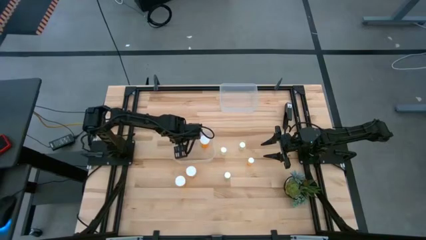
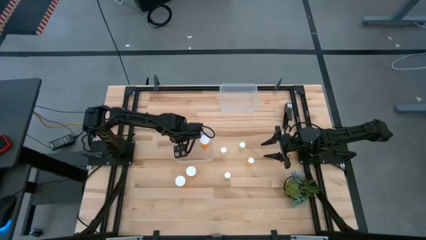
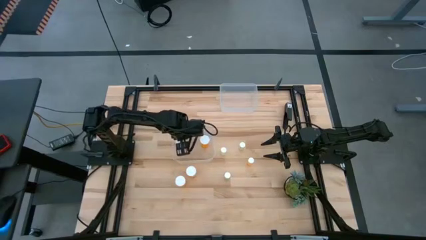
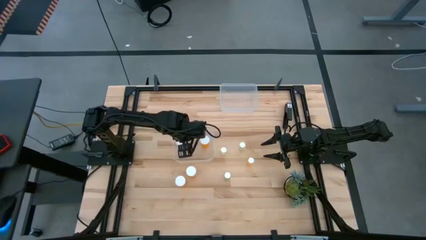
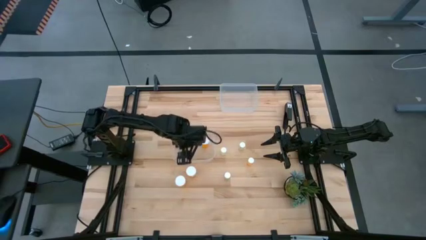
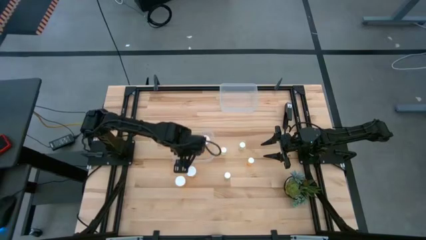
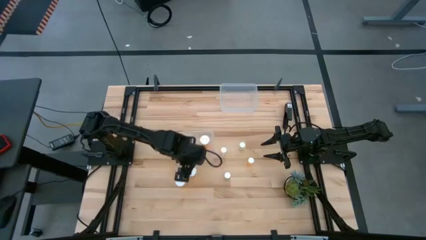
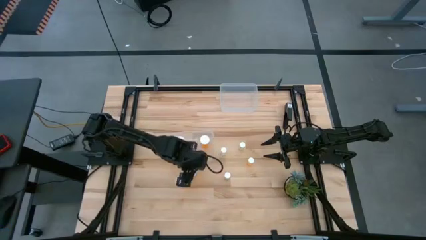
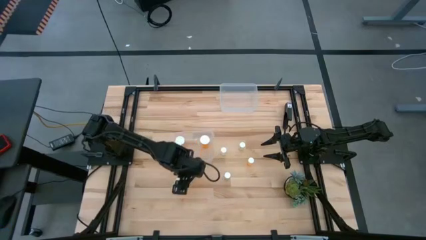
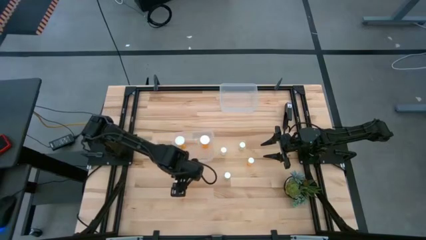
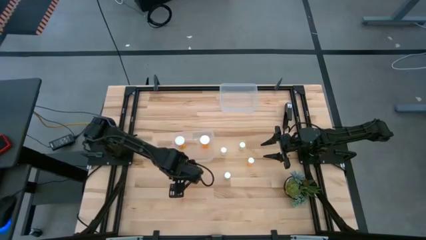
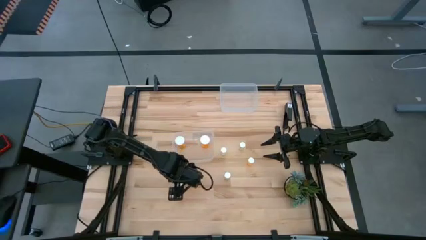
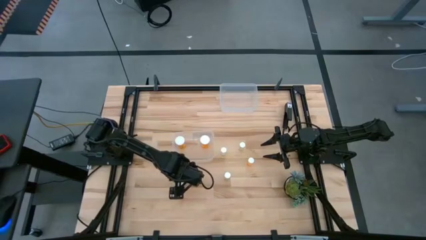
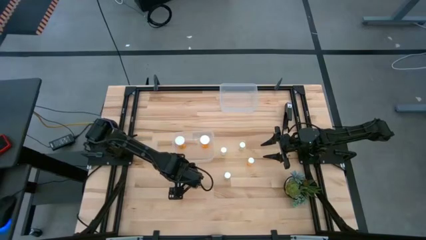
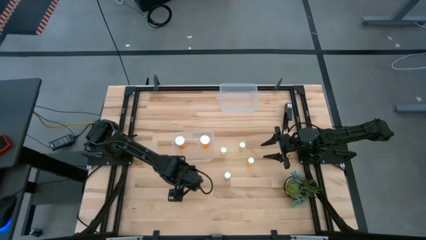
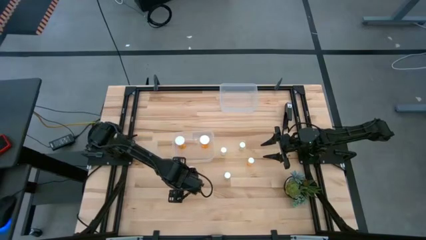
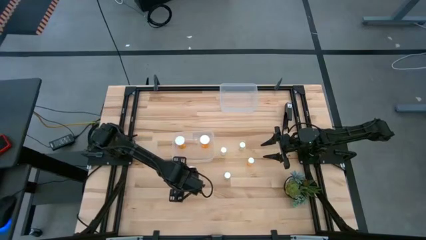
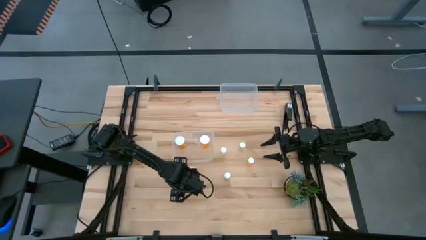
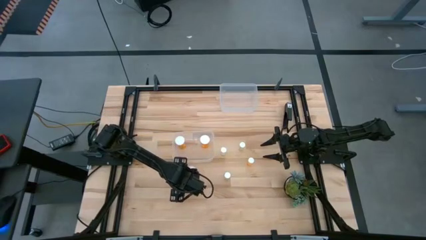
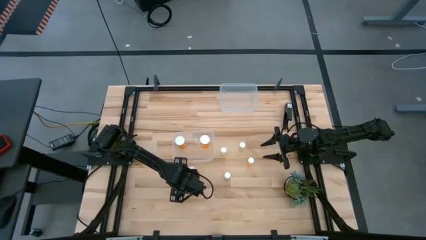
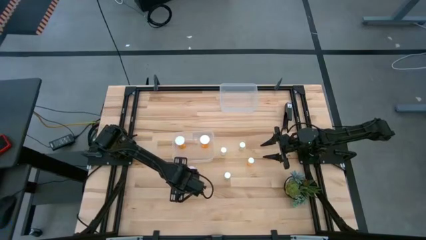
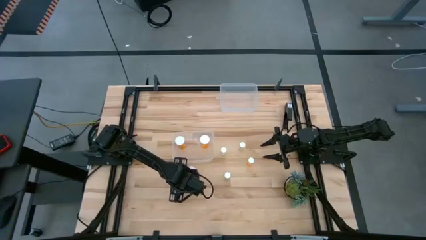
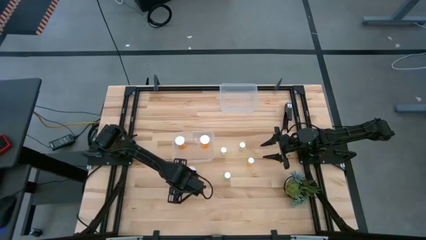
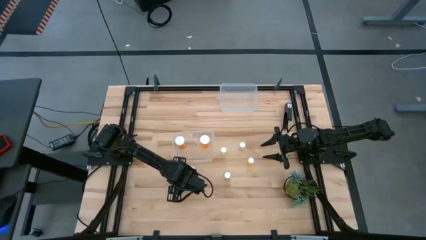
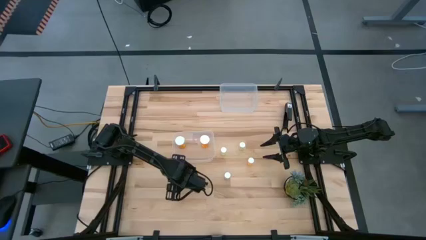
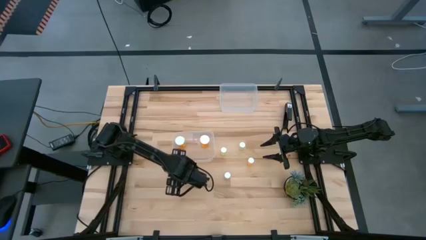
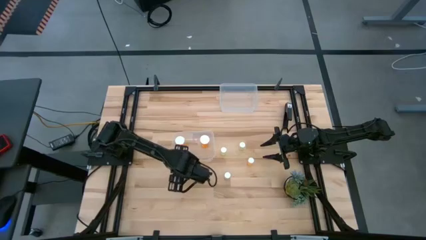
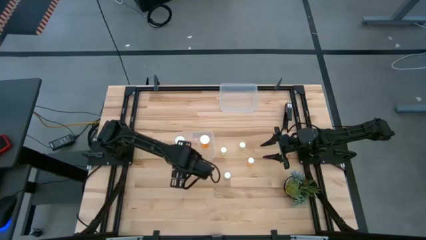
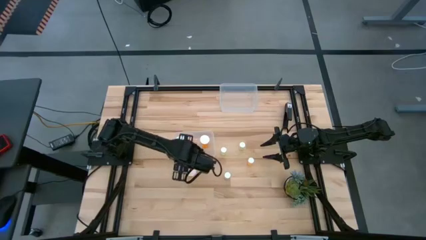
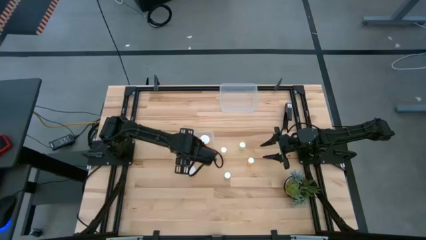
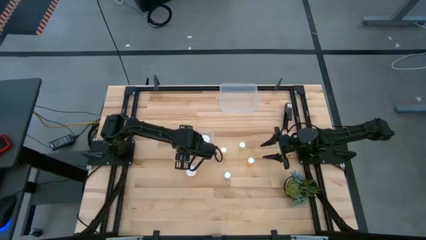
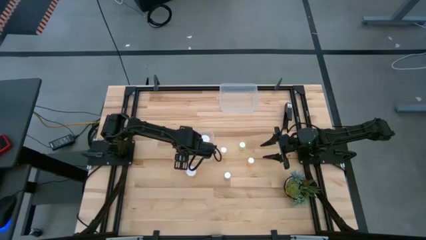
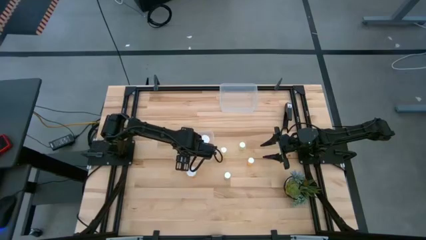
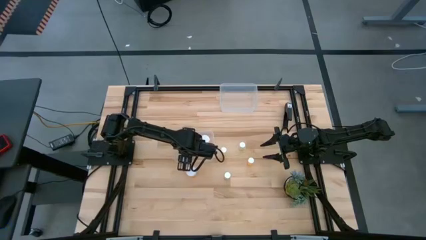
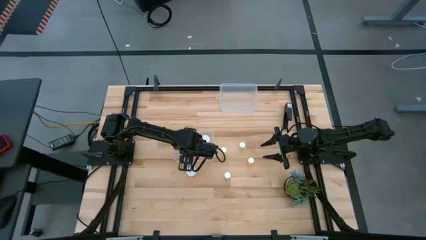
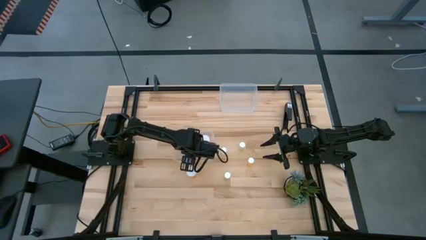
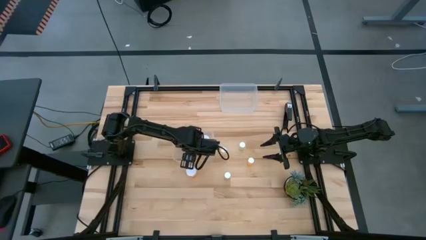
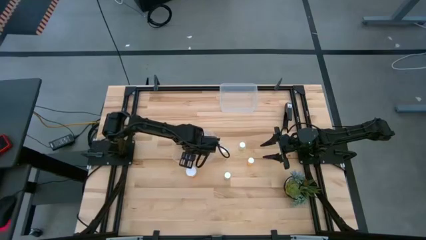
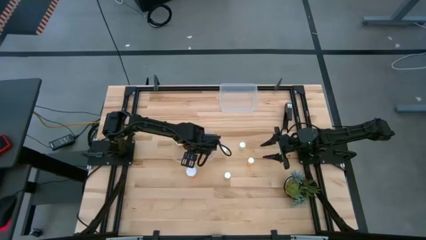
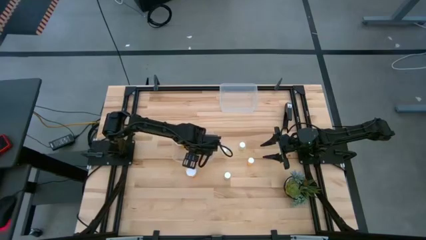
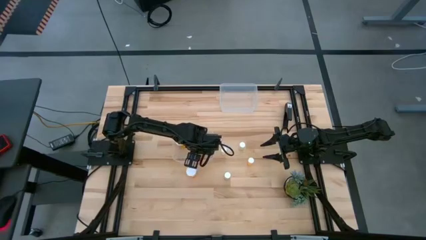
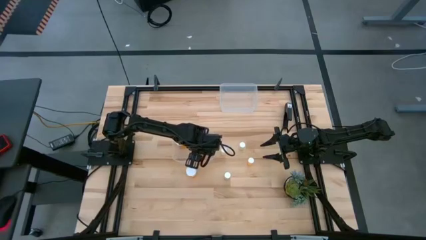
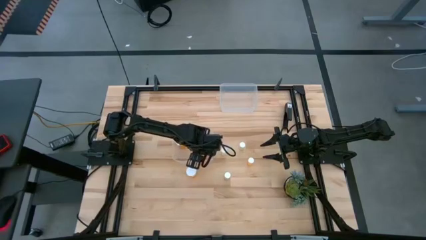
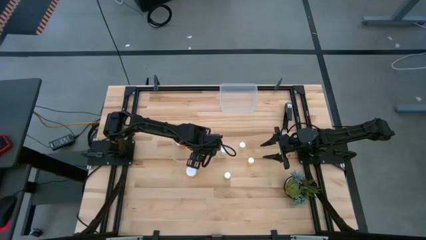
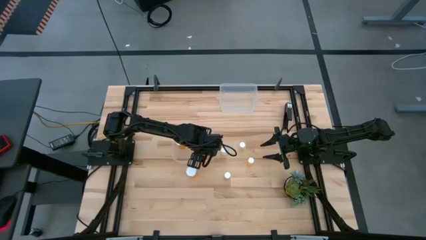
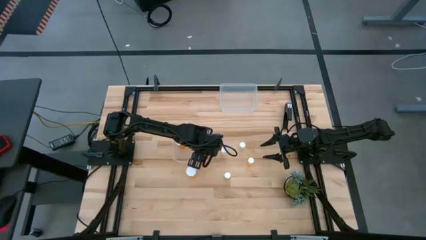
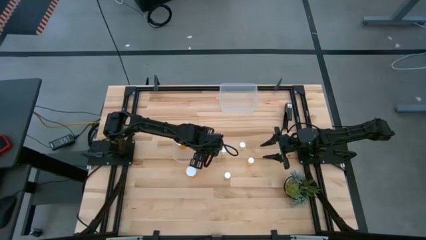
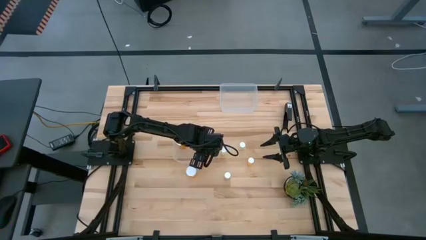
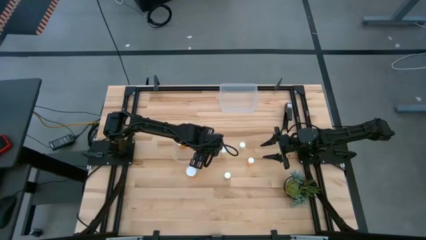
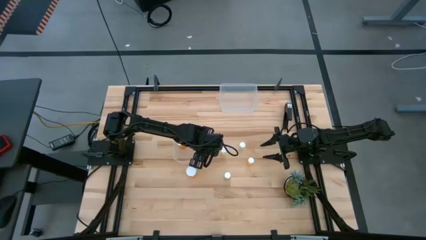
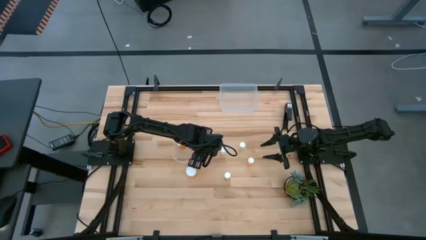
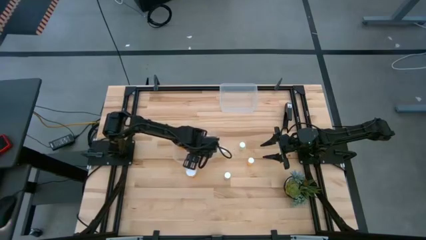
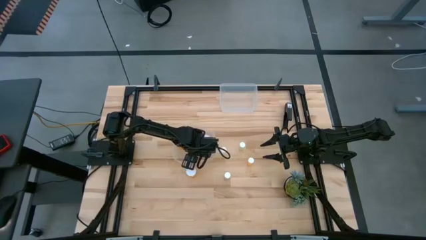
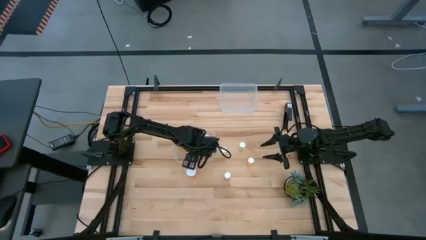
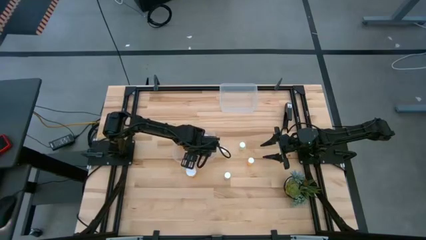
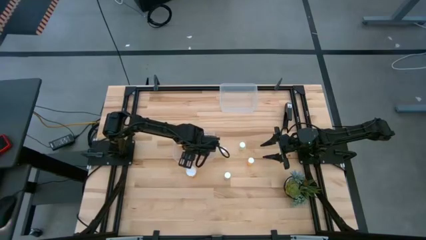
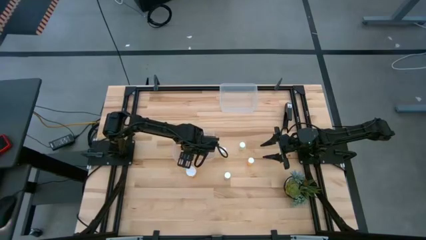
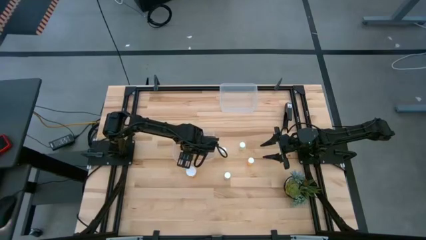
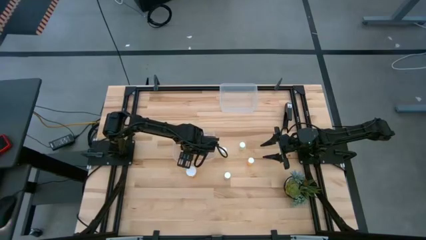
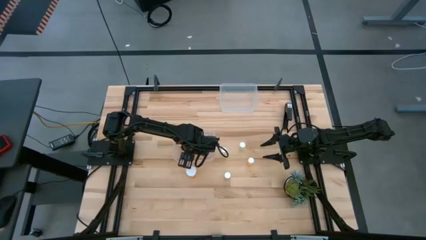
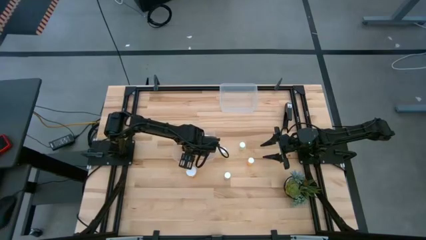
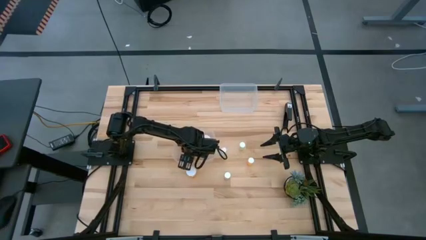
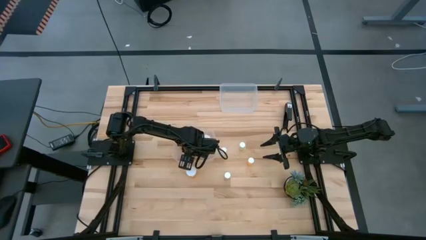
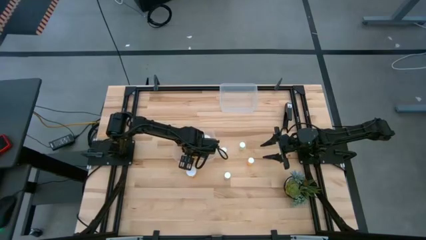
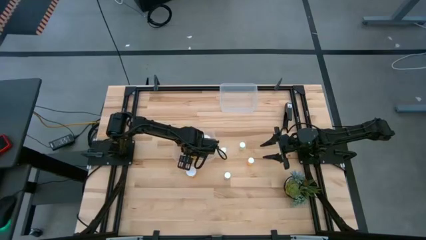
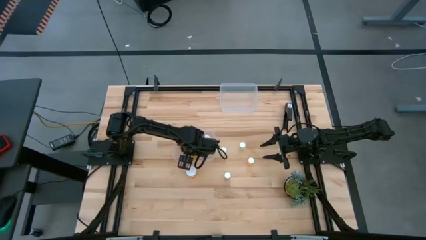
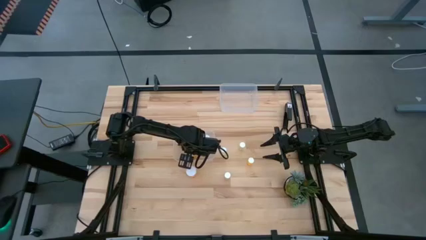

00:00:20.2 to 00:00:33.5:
Task: Pick and place medicine bottles into bin by pill shape (circle, oval)
Put the large orange pill bottle into the bottom transparent bin
